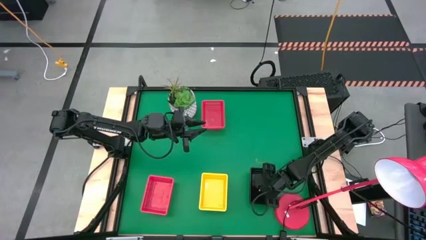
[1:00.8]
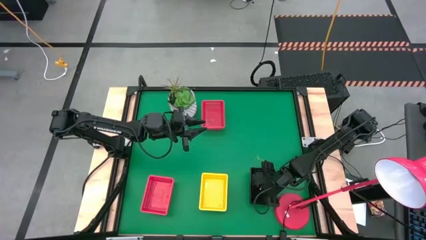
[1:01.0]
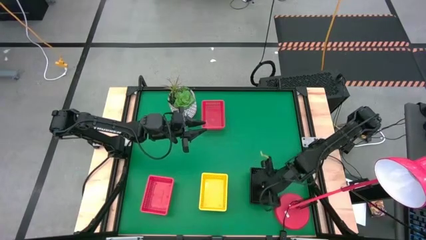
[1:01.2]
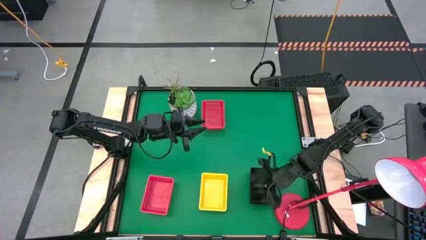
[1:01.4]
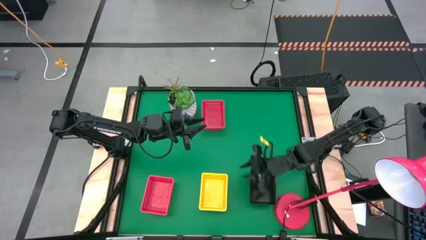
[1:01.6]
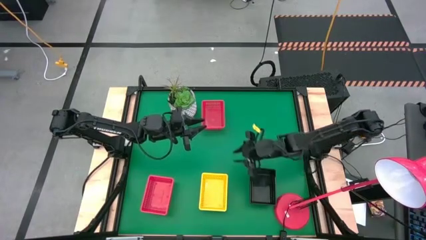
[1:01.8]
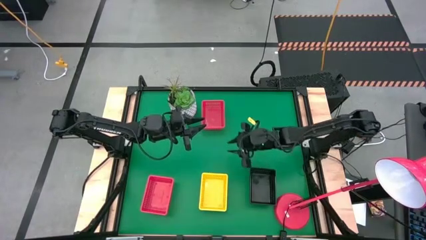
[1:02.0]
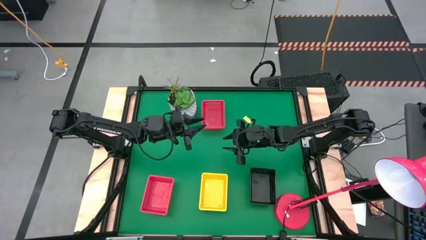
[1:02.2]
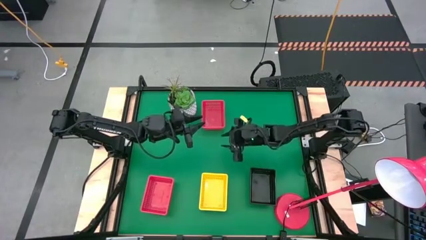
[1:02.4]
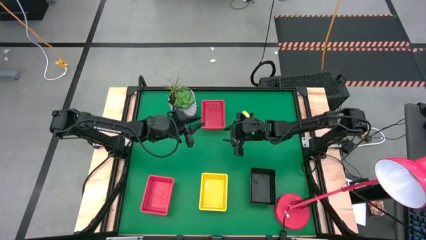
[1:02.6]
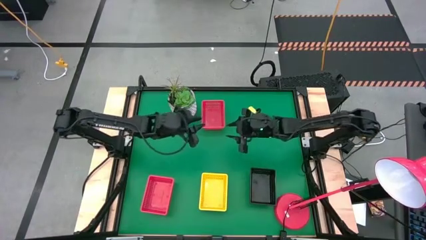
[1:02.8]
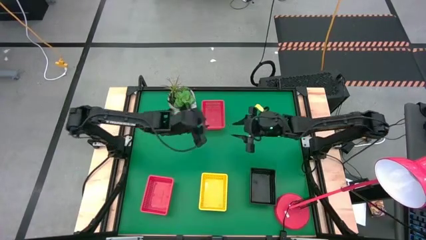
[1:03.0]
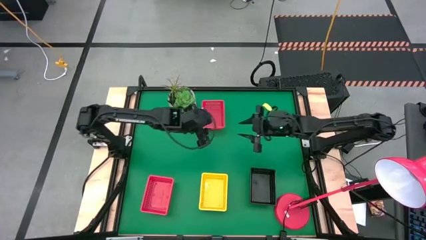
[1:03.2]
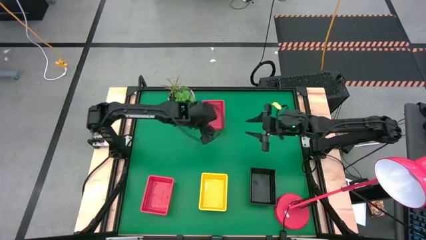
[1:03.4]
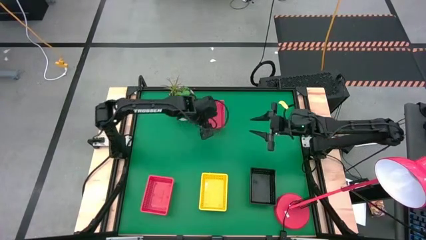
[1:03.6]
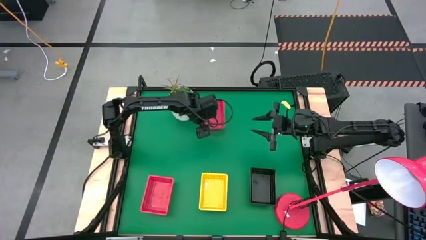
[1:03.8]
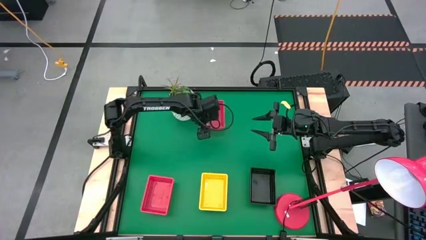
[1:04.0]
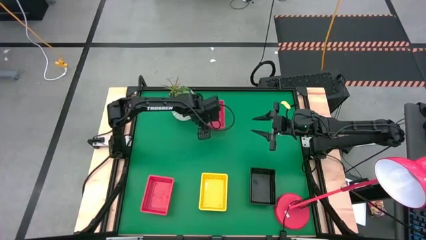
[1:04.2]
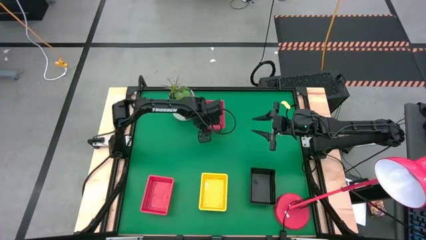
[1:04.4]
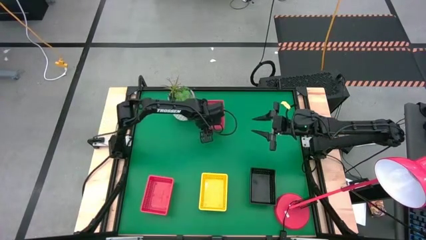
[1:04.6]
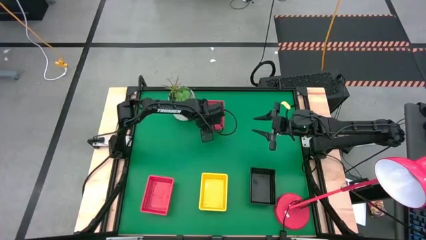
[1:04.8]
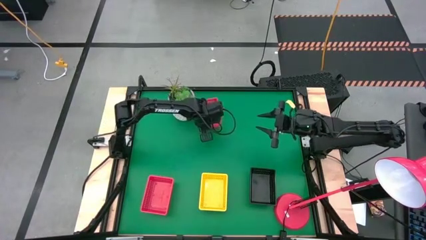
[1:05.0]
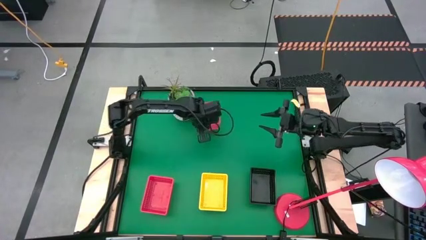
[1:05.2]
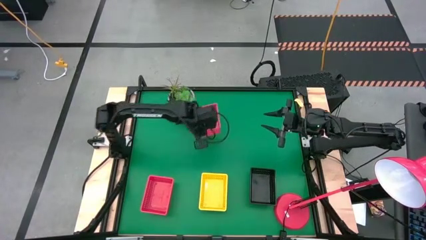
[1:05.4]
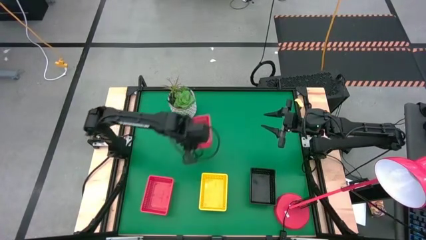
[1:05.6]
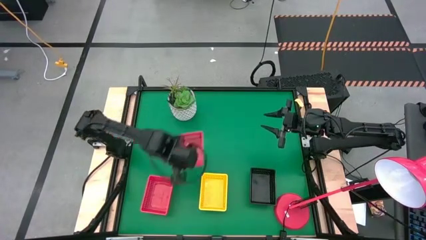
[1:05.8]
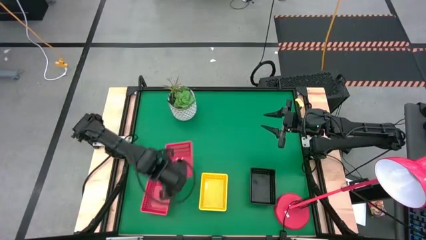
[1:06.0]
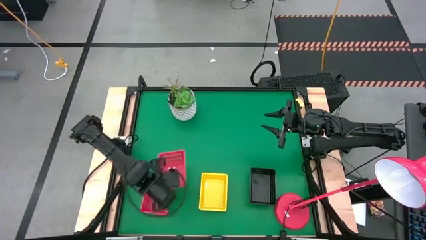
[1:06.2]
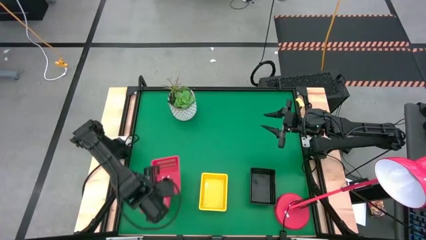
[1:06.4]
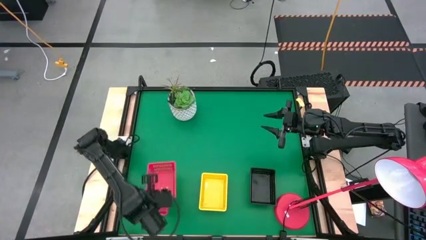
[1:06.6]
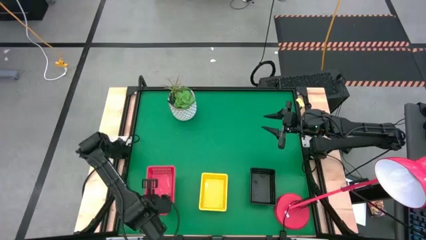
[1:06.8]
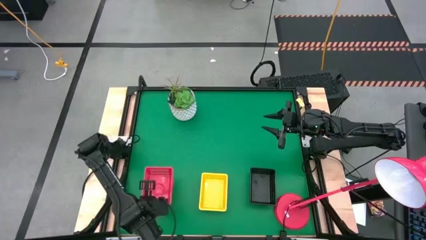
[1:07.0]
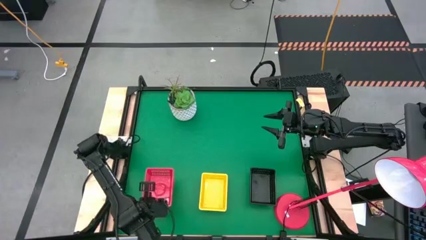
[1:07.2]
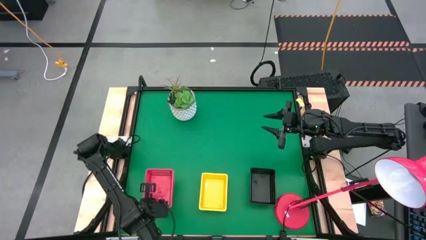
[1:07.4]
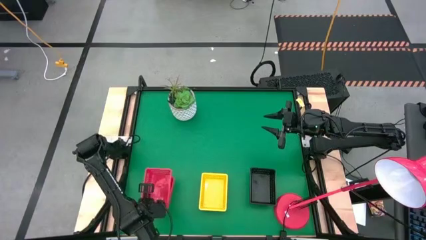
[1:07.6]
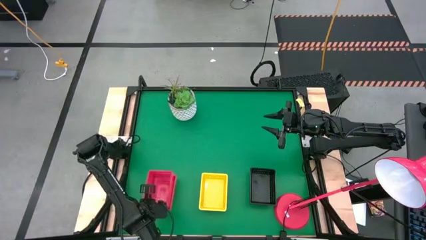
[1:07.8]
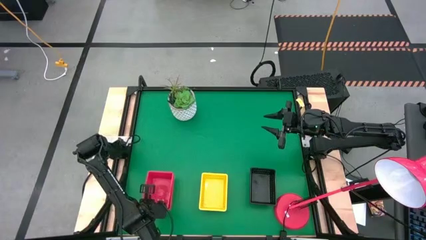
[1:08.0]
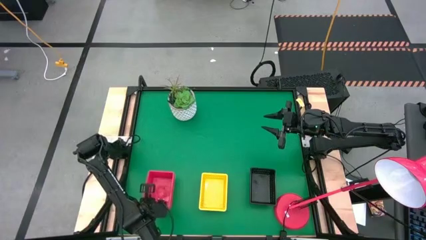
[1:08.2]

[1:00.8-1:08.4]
Stack the top red bin on top of the bottom red bin

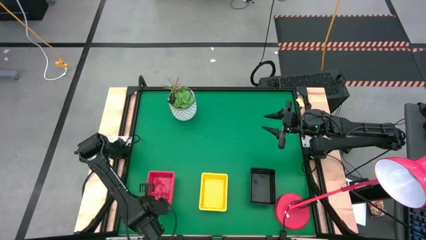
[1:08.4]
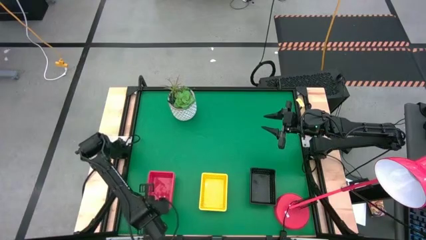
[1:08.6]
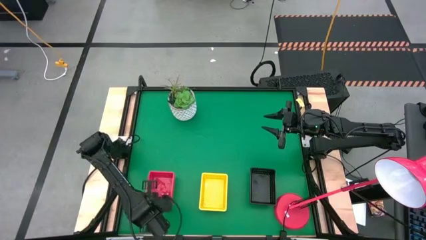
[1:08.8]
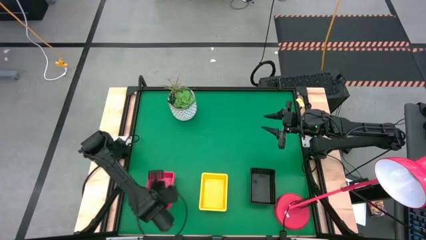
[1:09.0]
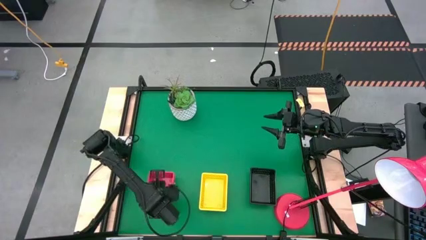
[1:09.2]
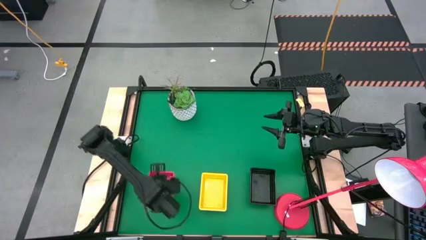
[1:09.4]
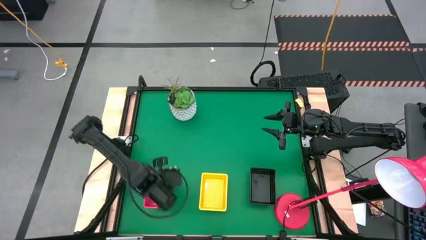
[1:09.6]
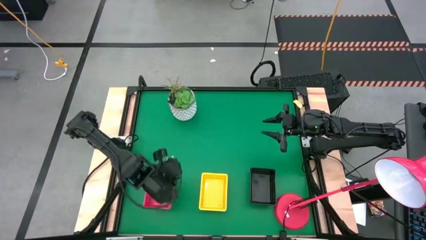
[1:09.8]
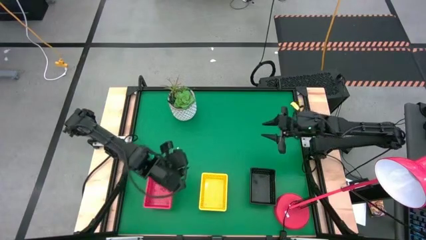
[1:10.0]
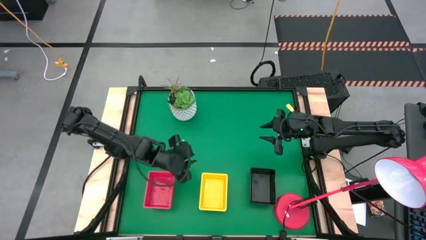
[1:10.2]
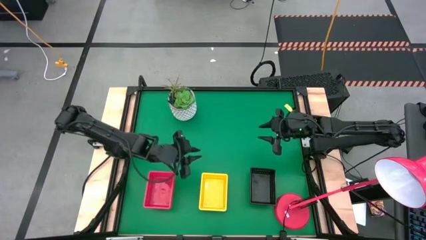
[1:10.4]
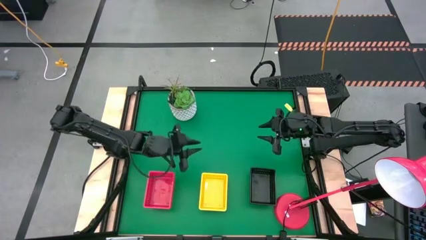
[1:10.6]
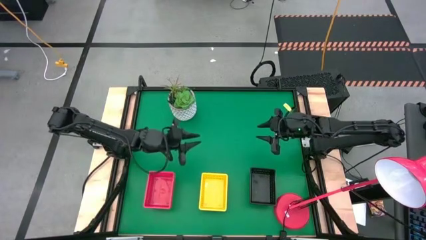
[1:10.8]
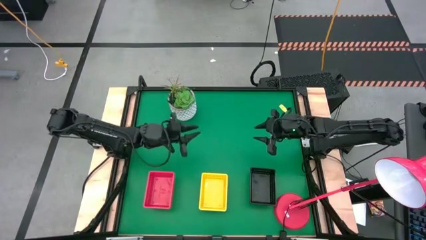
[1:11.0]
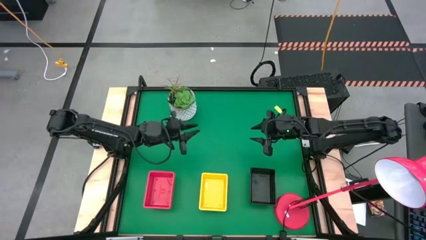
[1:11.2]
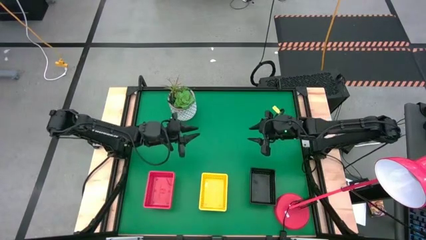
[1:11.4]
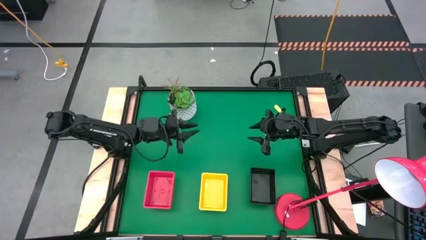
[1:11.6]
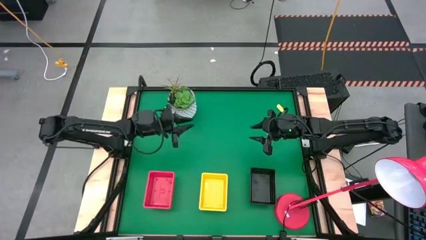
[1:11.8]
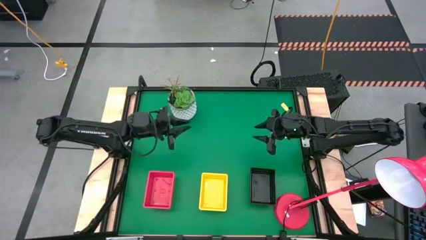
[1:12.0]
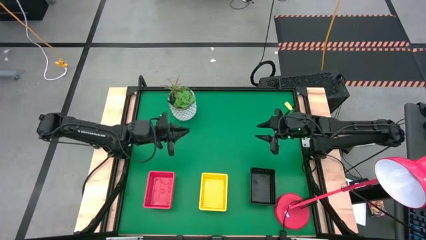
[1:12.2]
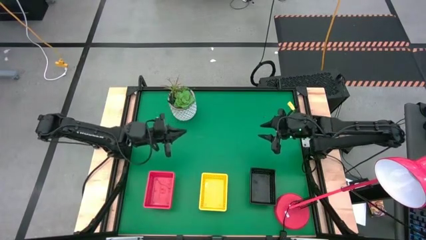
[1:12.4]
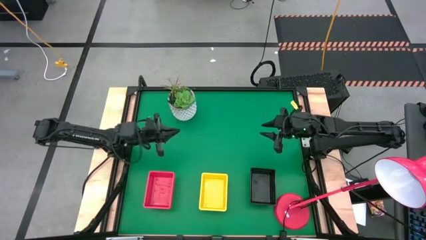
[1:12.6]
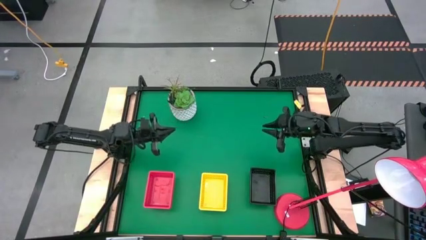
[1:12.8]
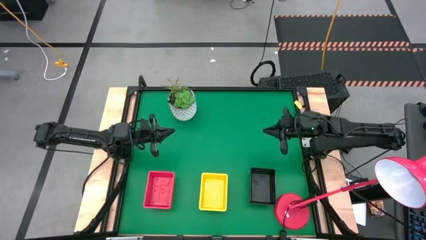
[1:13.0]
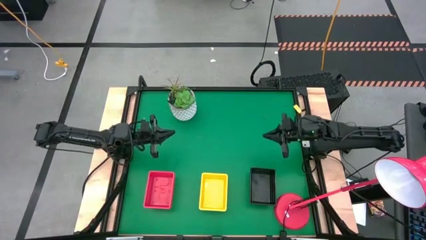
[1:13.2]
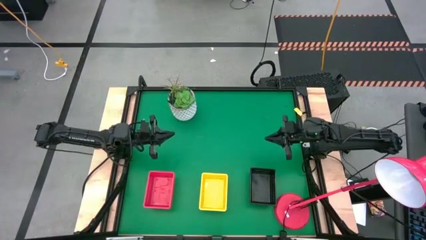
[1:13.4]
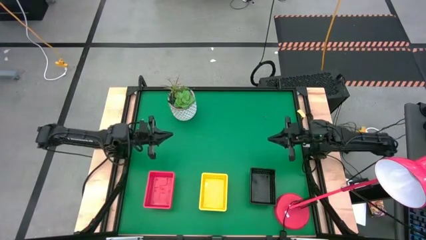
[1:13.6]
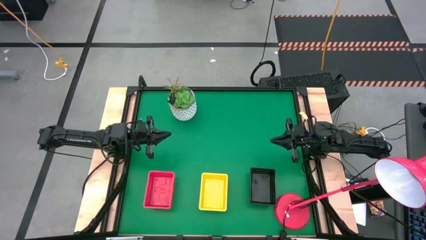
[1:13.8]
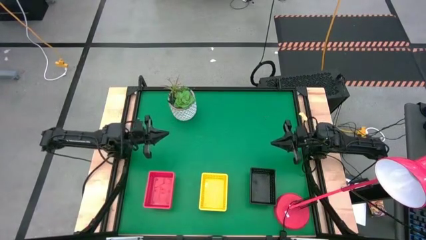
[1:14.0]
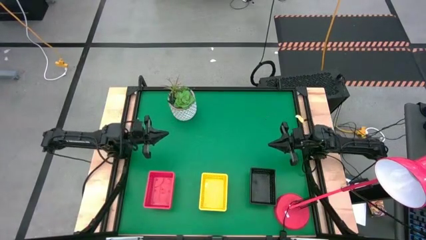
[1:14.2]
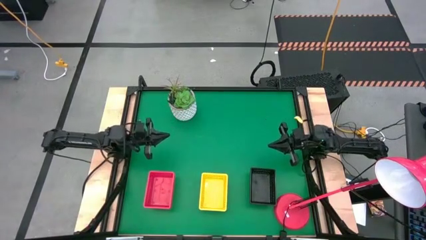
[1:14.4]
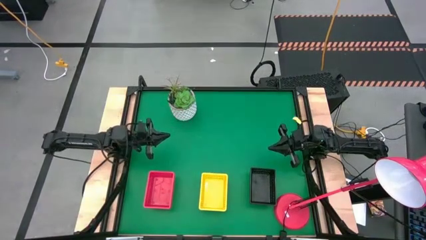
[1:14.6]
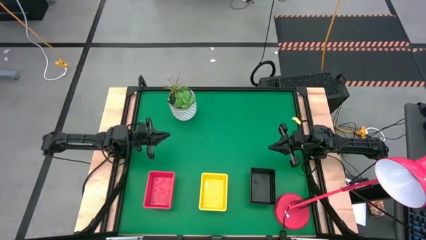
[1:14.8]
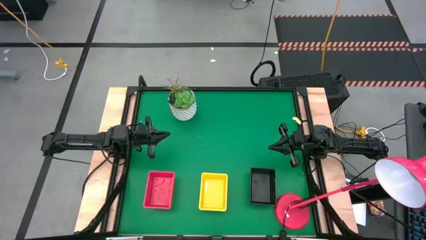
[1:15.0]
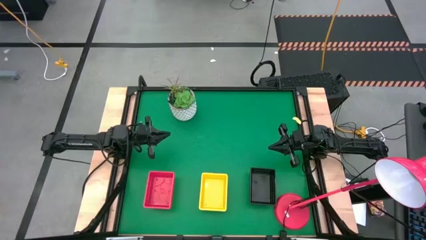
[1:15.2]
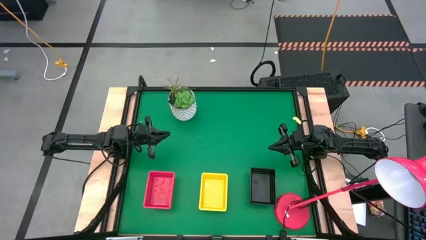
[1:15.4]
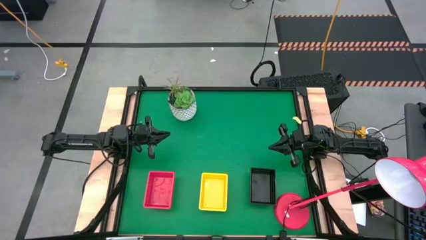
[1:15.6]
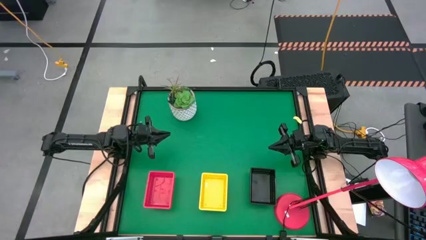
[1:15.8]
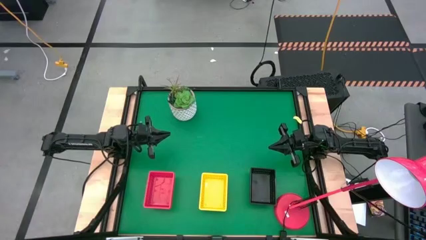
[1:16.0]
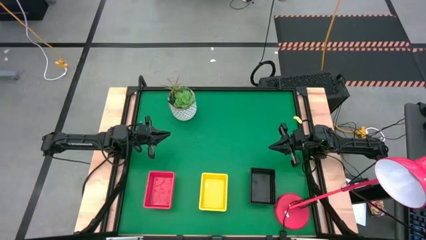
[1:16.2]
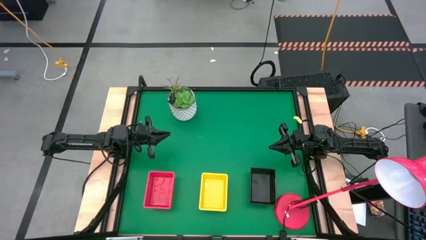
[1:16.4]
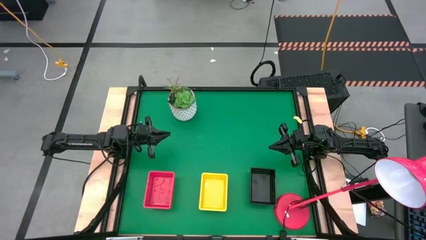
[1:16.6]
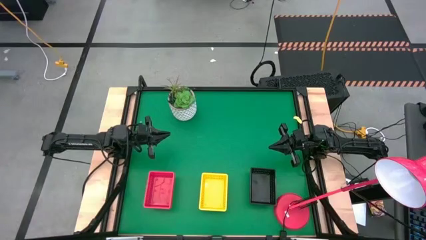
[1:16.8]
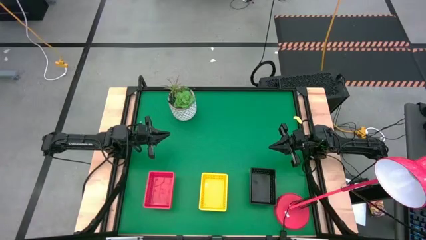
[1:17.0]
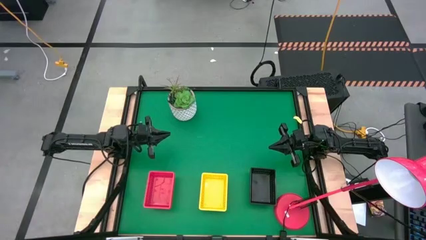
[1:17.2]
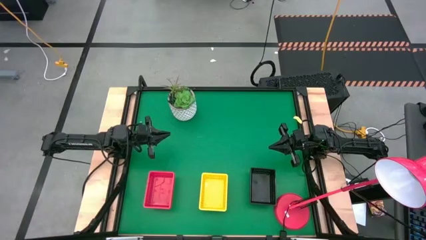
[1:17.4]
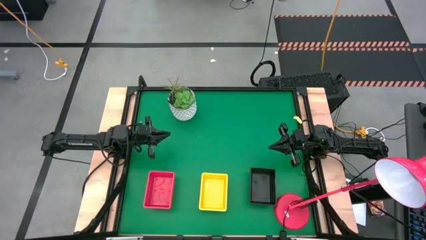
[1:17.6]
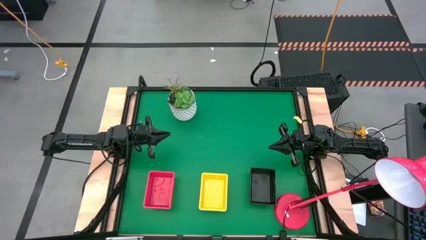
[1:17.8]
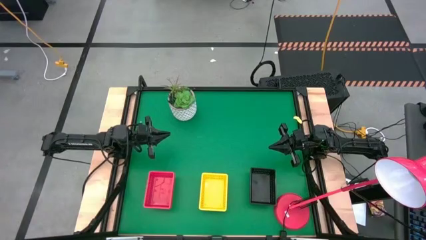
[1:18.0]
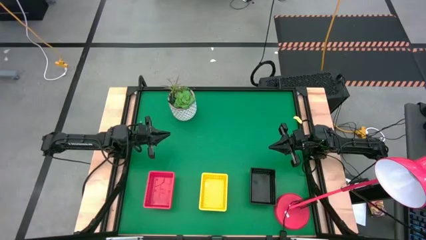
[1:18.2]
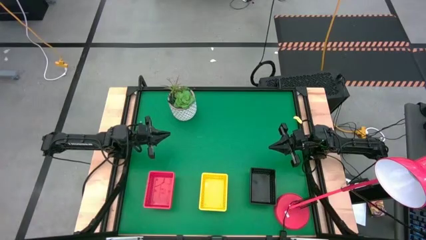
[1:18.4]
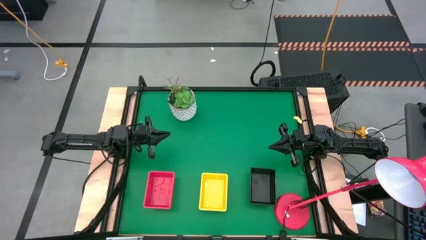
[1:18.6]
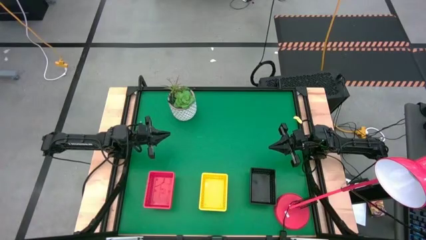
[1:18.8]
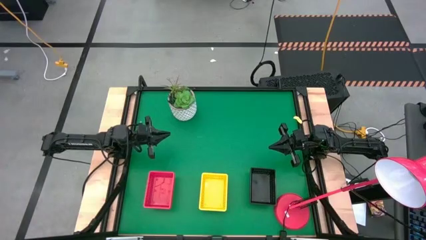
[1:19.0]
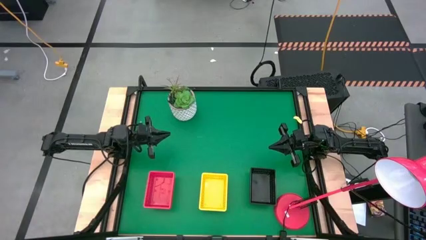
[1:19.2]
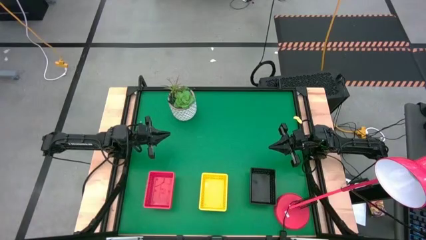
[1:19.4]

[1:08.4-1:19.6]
Return to Home Position
